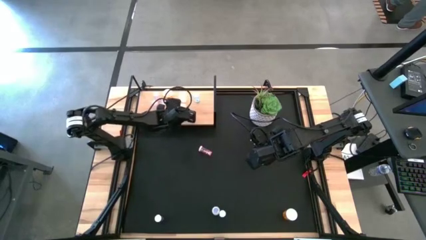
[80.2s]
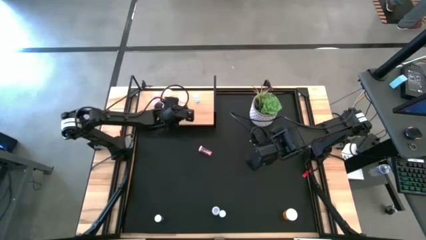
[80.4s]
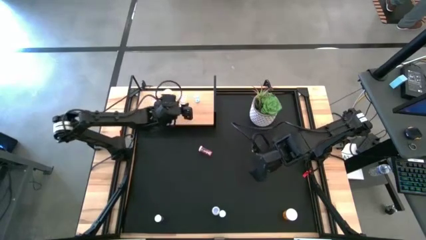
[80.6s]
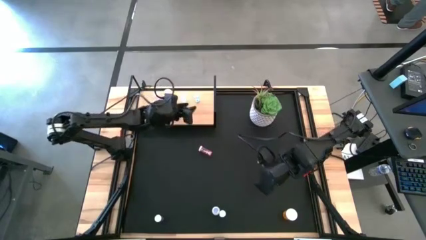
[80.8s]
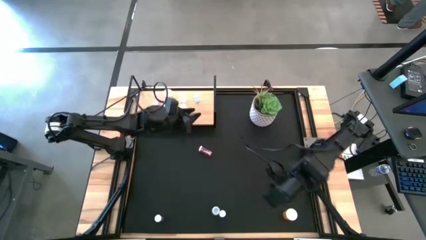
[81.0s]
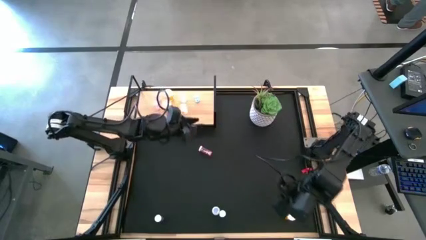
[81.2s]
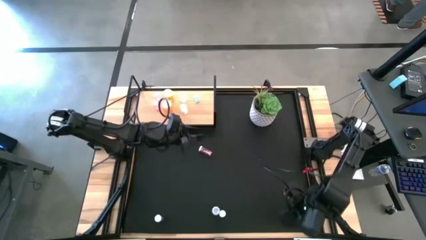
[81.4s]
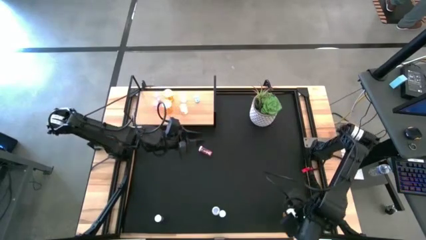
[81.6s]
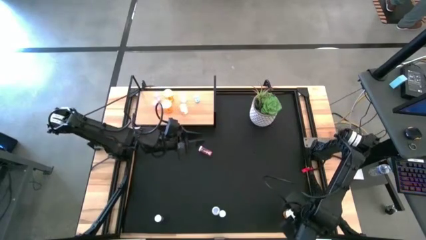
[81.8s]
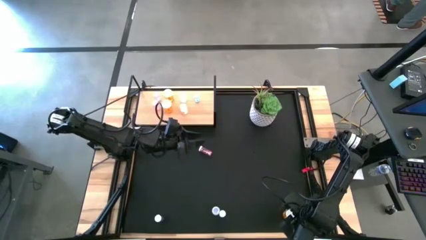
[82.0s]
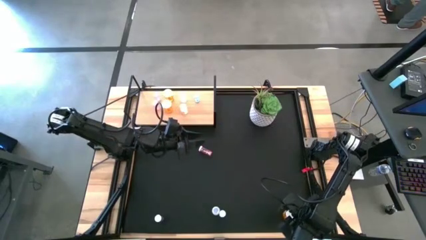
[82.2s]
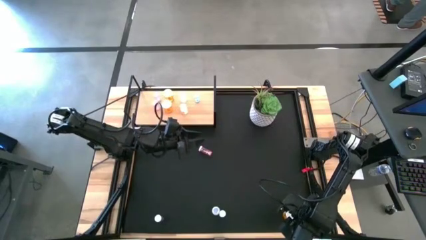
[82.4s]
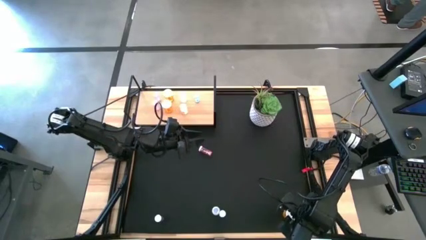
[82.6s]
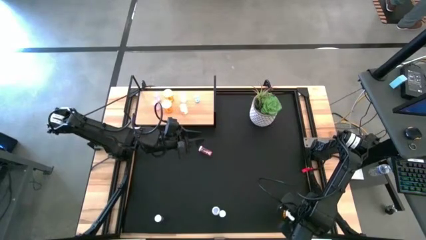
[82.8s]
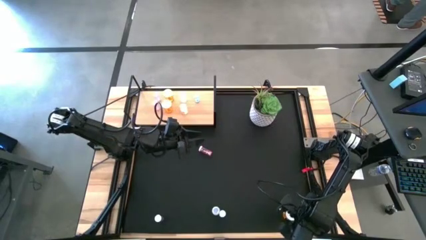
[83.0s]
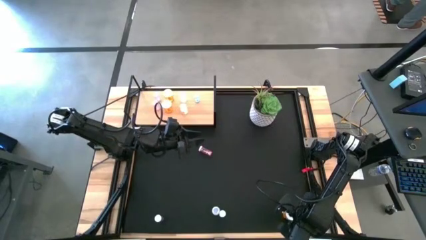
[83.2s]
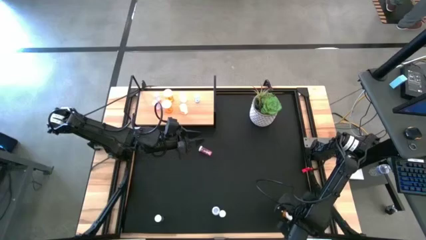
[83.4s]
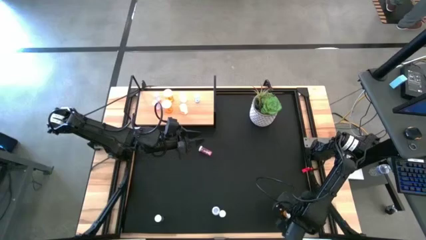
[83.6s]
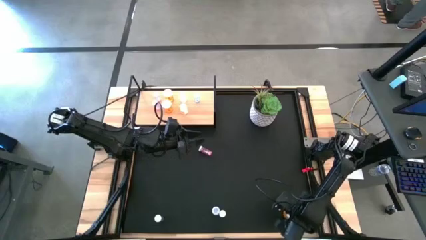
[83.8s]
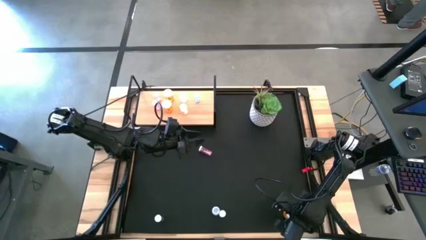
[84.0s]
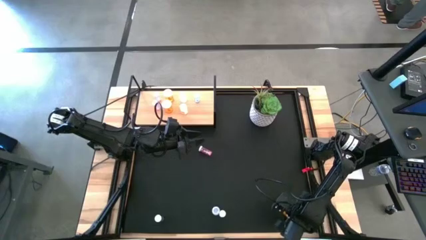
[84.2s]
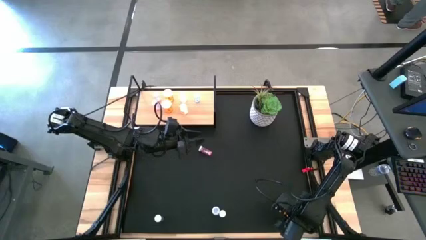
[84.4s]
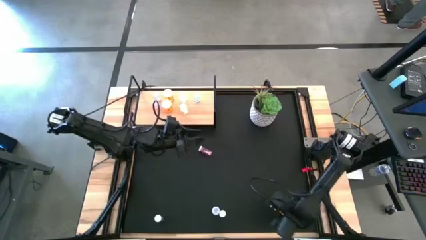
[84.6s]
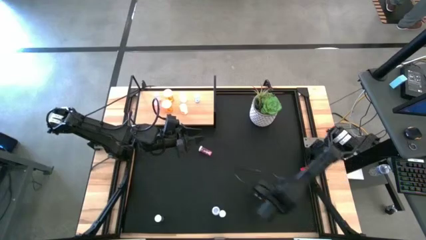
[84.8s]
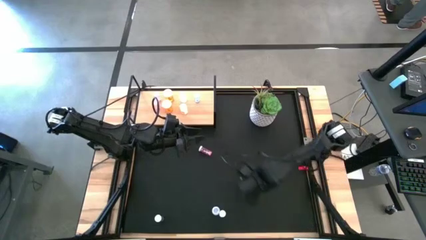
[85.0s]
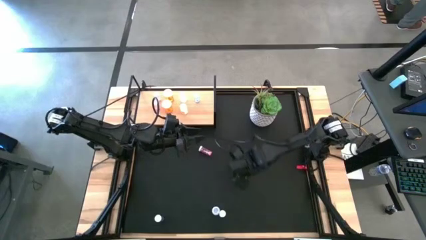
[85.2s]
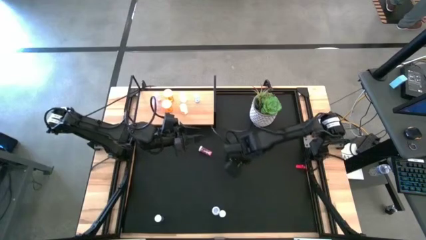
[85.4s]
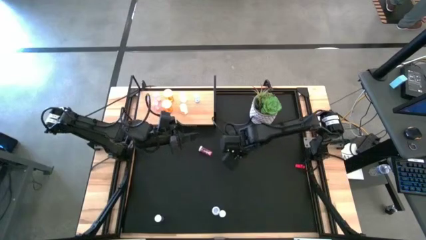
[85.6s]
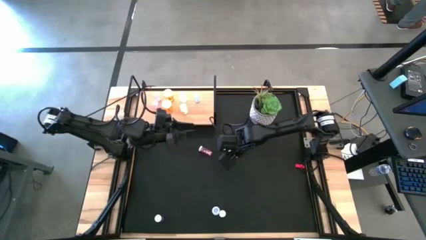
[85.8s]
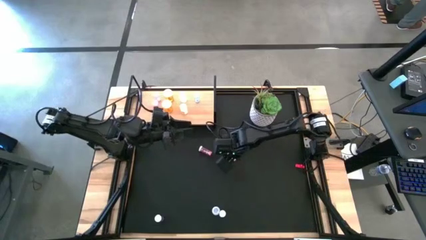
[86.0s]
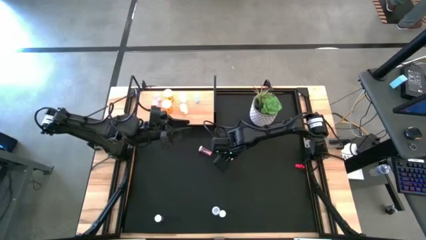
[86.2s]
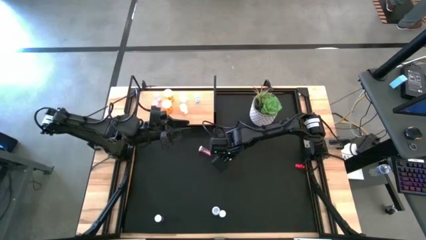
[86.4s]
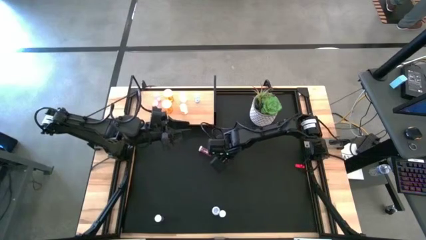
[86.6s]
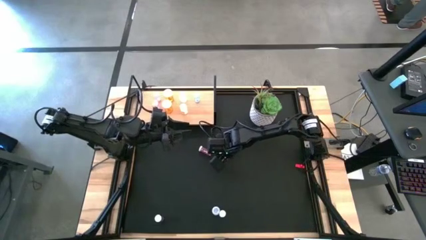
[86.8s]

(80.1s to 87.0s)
Task: Pick and place medicine bottles onto shelf by color
Move the orange pill bottle to the center of the table

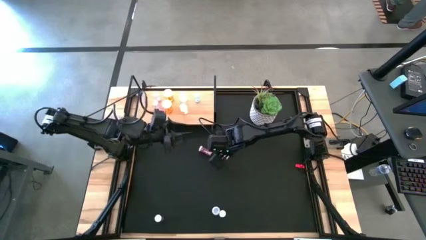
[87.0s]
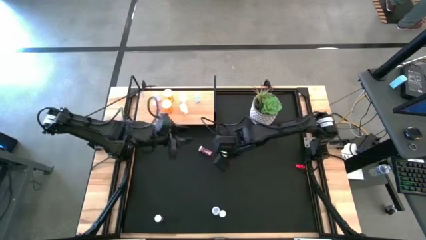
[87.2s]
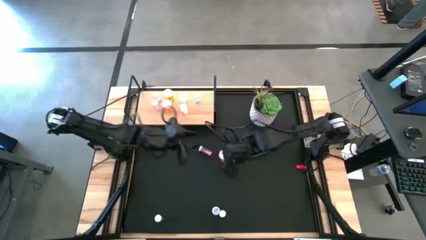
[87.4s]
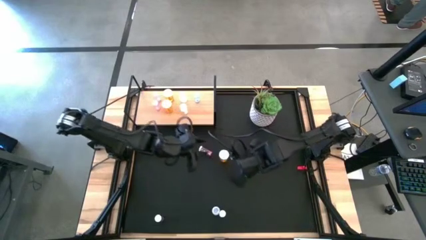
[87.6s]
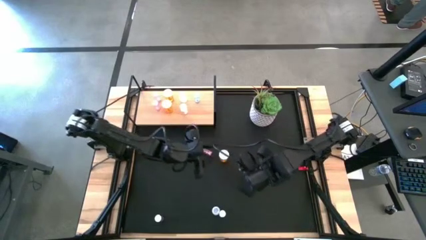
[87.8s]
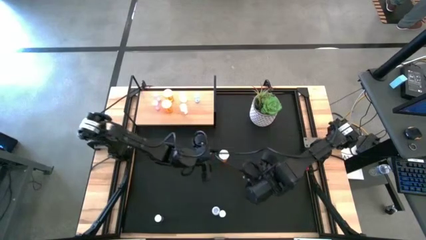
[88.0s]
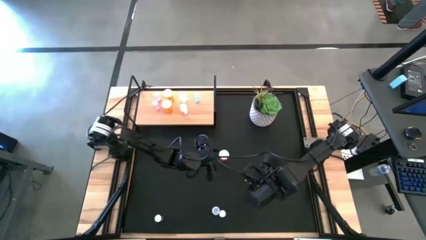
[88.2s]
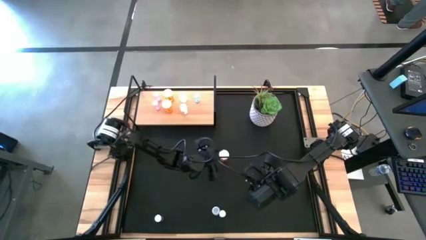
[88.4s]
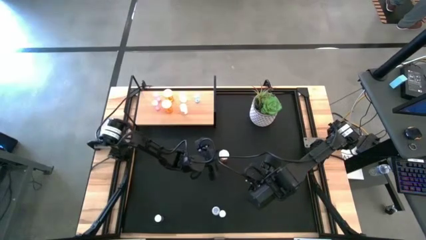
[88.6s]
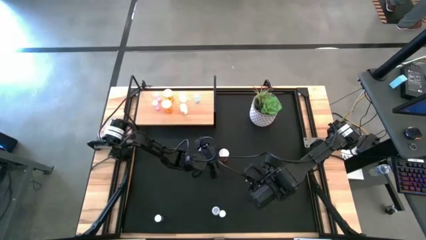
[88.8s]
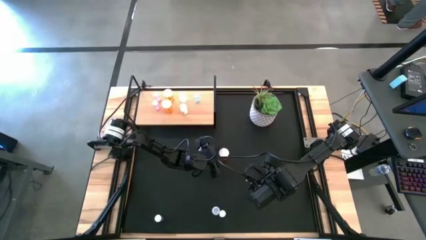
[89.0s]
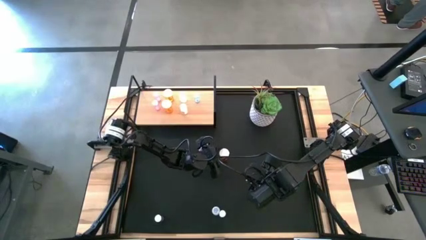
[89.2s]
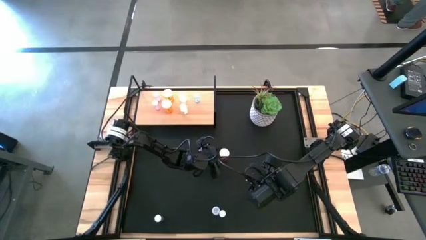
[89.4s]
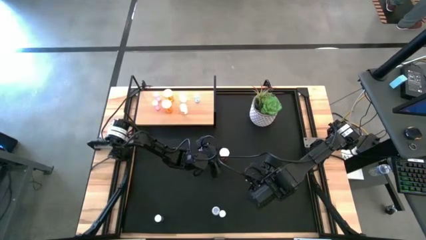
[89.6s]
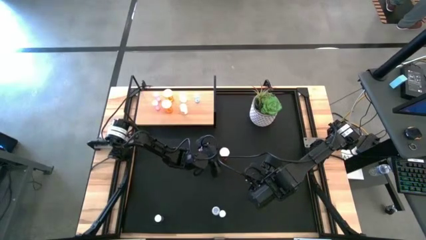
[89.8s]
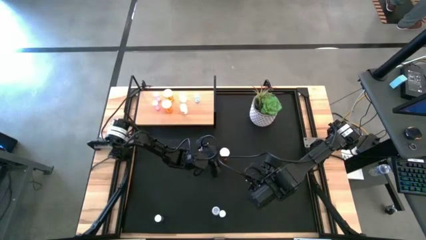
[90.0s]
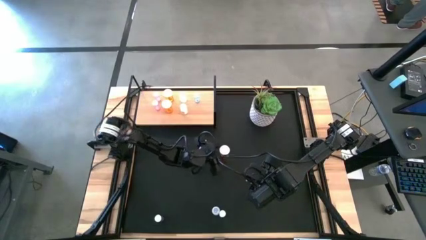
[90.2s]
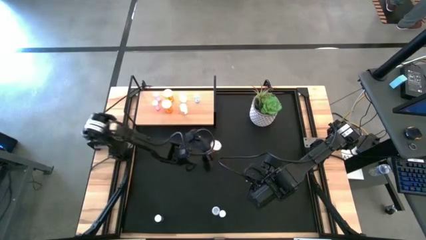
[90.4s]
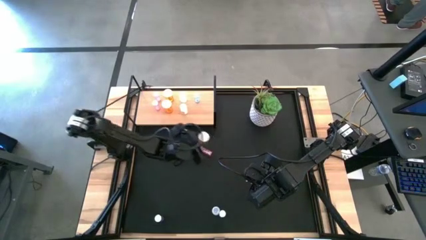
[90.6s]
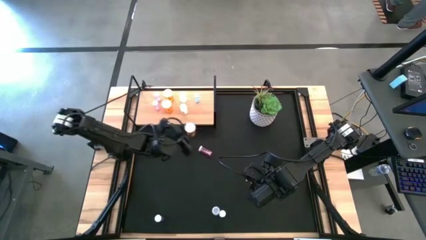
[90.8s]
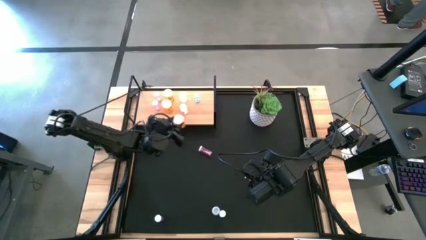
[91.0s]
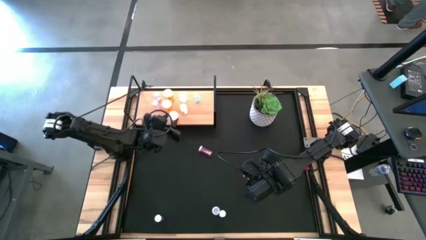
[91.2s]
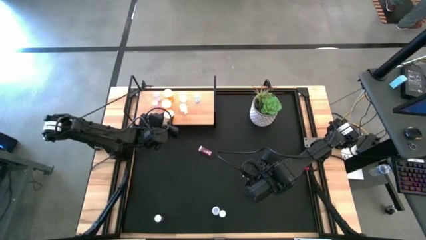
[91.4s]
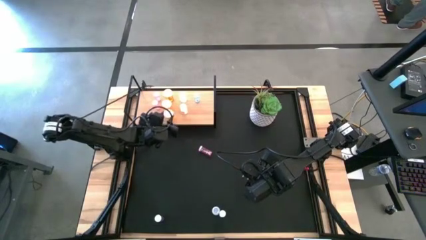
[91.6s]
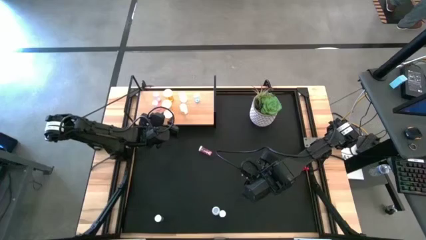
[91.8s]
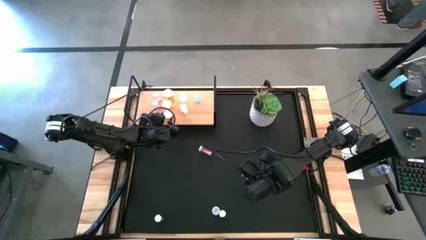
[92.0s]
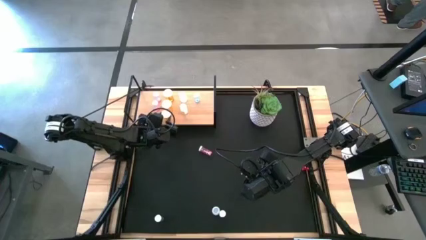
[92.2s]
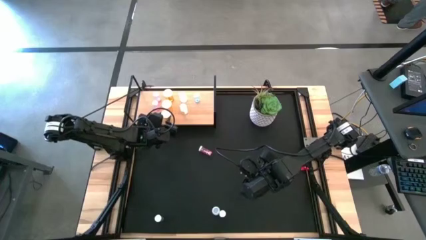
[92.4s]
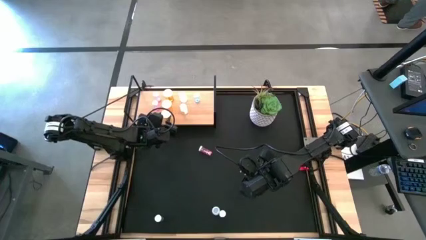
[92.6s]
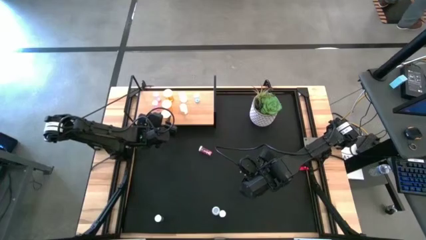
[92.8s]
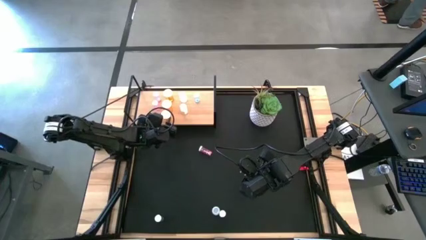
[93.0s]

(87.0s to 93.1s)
Put the orange pill bottle on the shelf aligned with the other orange pill bottle

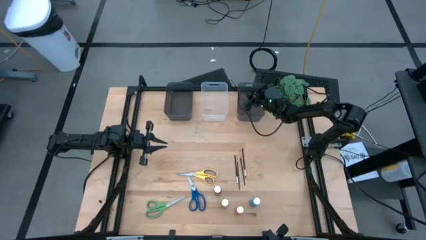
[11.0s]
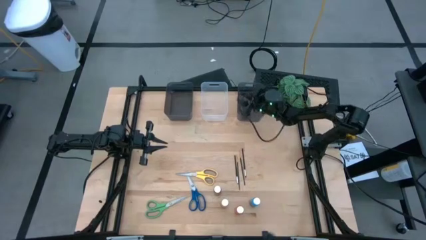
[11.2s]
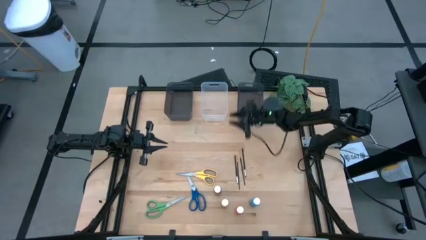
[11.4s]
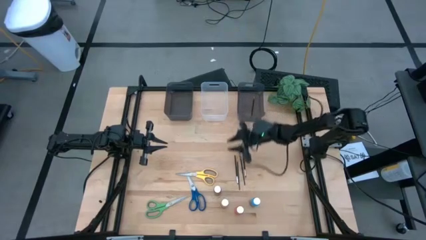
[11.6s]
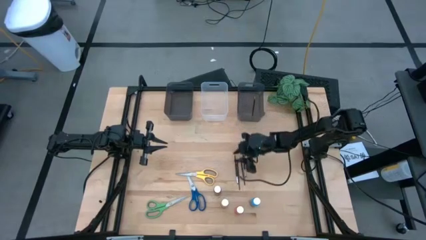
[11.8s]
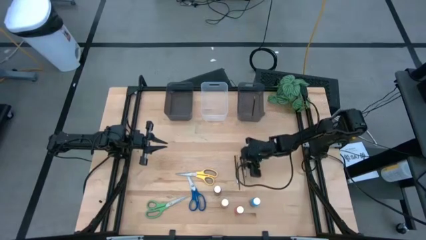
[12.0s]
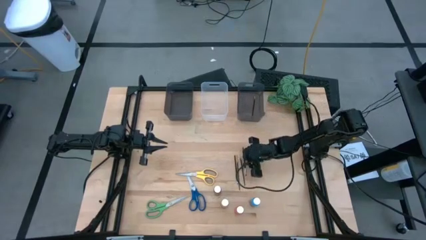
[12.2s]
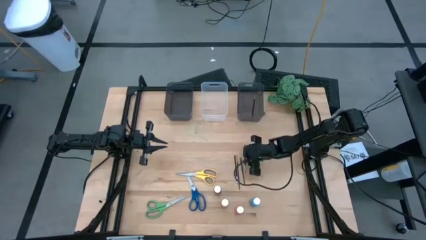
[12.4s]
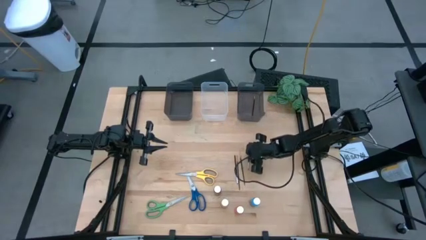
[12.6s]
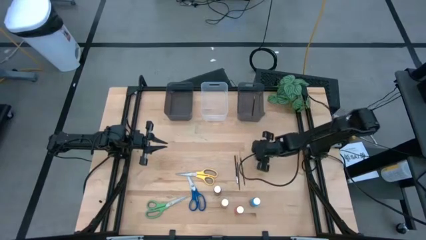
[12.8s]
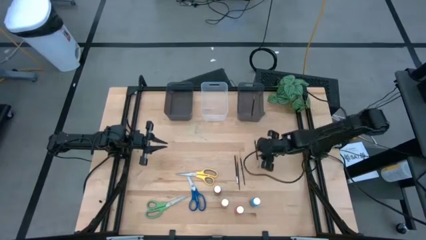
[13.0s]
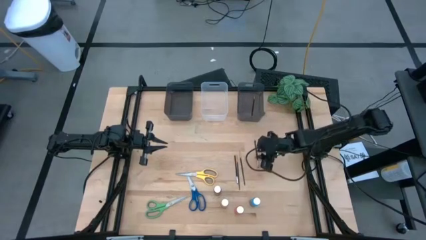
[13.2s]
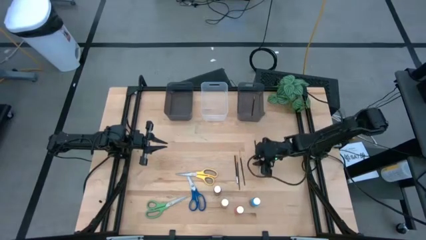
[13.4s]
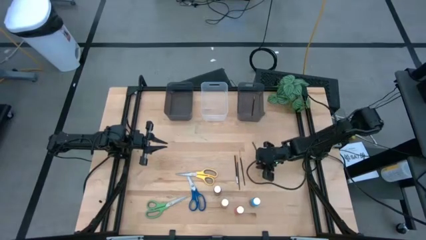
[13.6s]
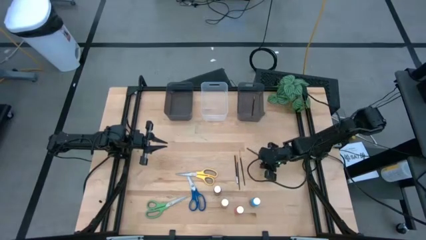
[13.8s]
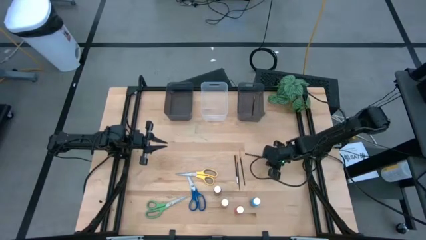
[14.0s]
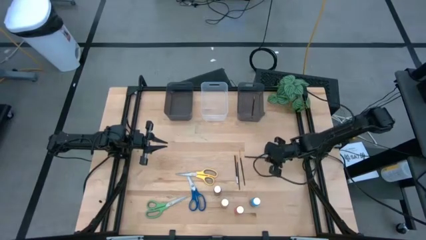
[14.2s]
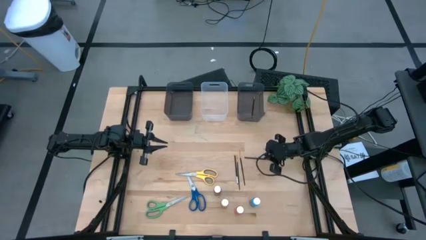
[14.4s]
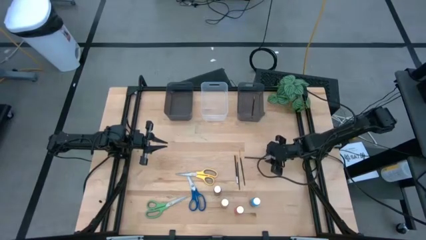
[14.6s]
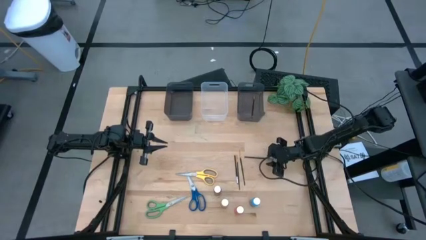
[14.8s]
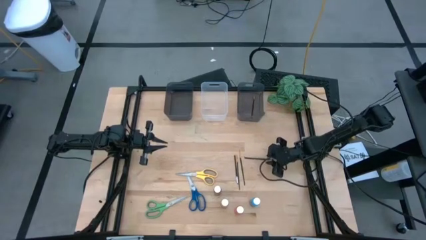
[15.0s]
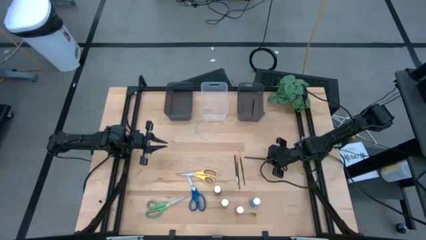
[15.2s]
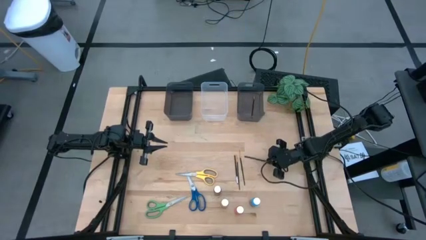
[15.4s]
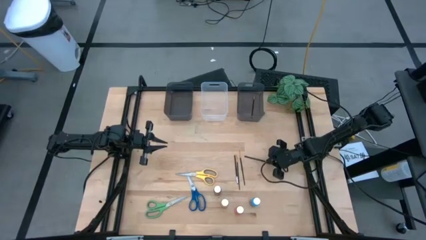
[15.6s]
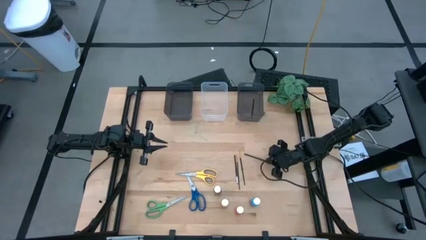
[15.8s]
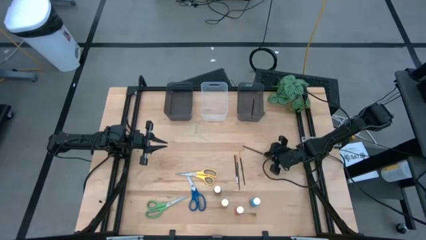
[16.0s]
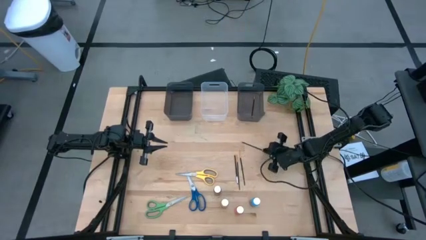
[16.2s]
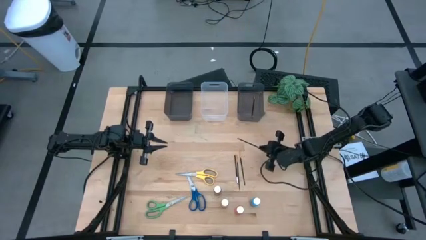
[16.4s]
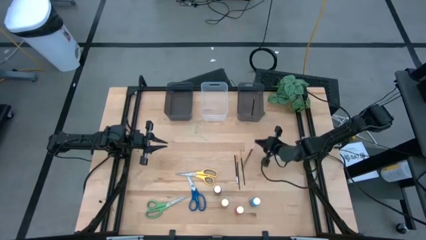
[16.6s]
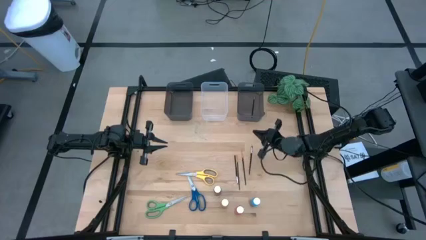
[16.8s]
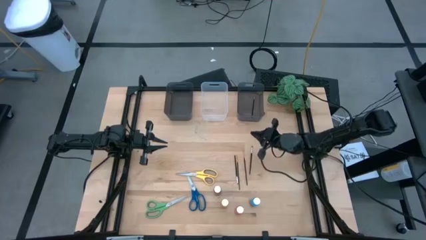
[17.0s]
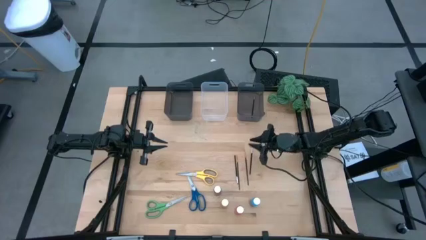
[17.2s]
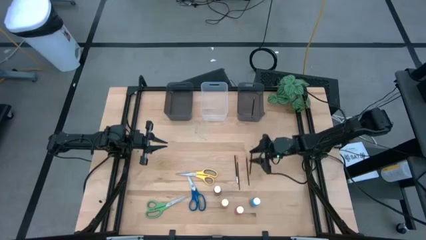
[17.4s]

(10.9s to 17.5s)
Task: Pick & Place Paint Supplies
Put the black paintbrush into the right black bin
